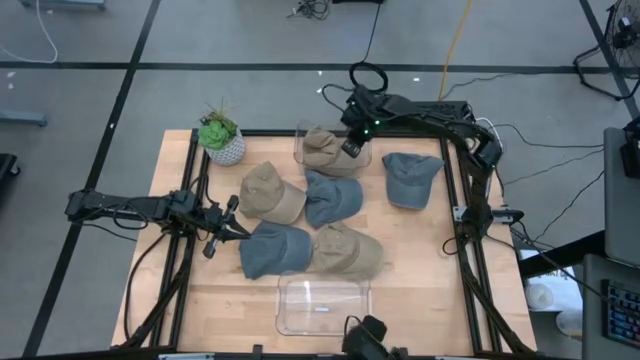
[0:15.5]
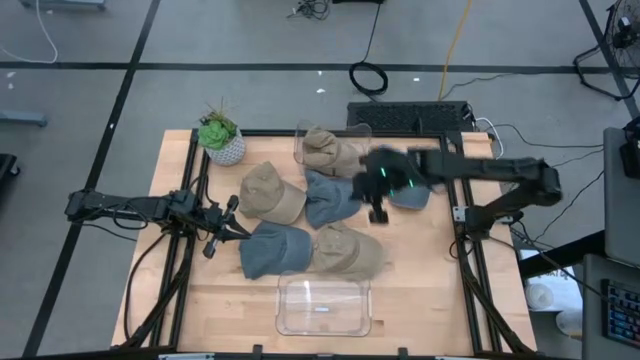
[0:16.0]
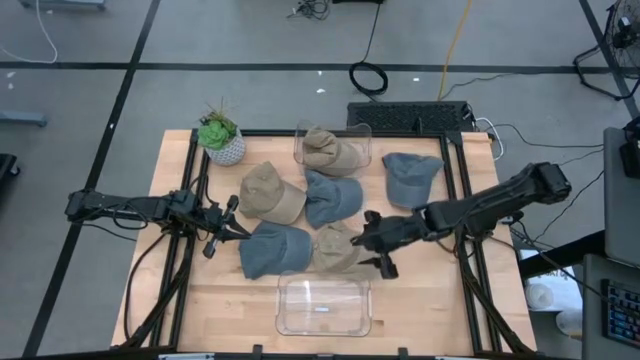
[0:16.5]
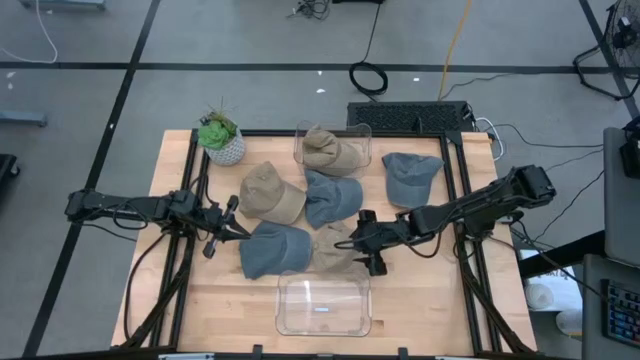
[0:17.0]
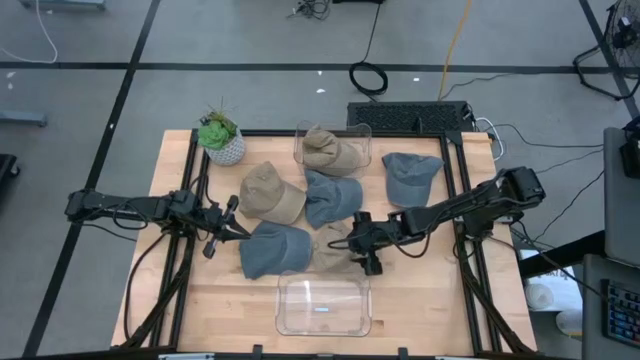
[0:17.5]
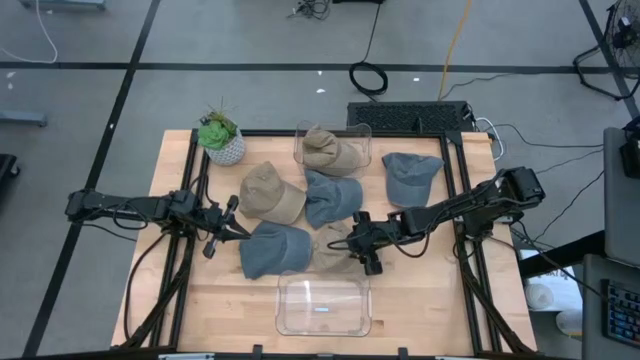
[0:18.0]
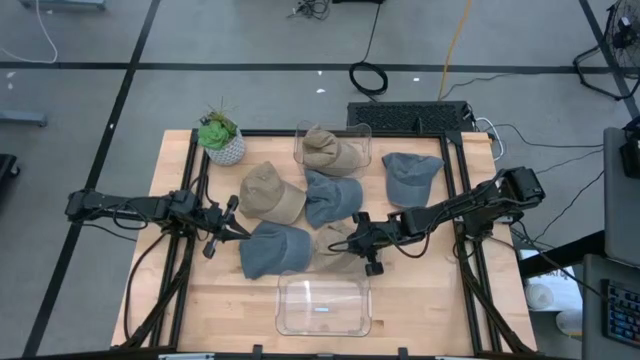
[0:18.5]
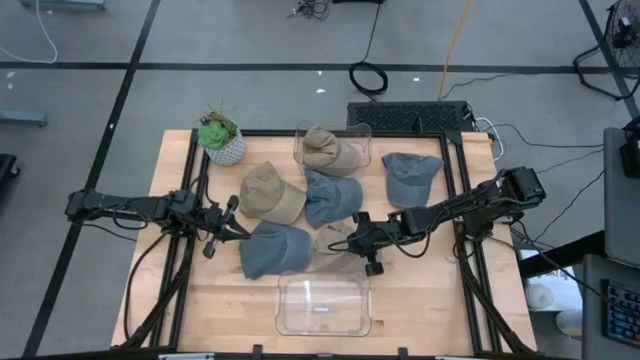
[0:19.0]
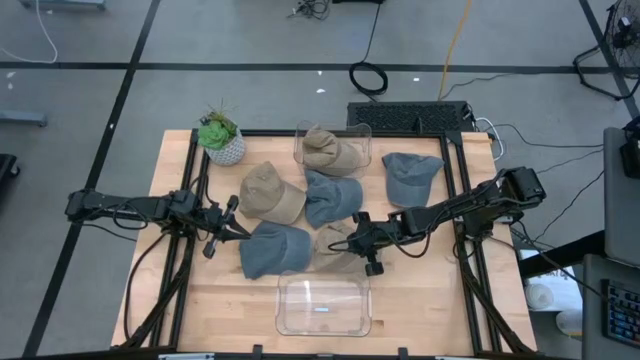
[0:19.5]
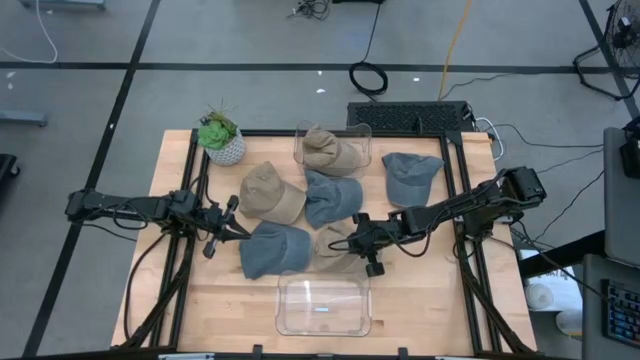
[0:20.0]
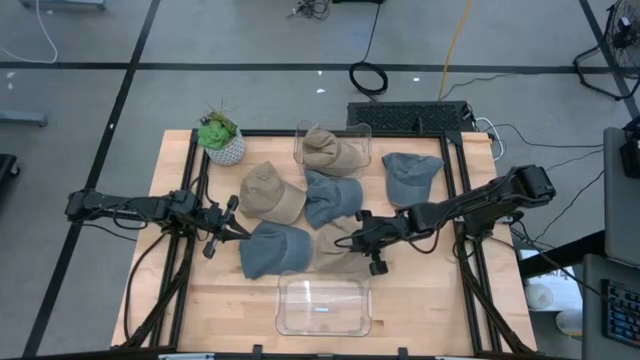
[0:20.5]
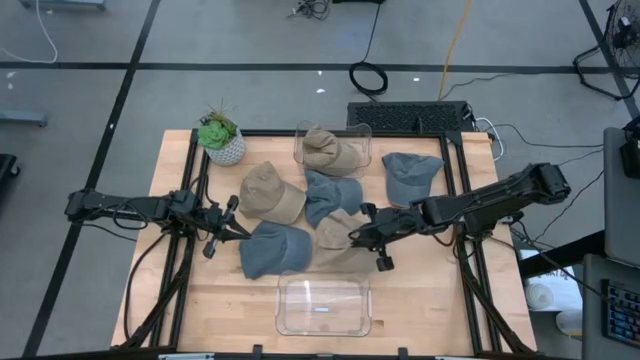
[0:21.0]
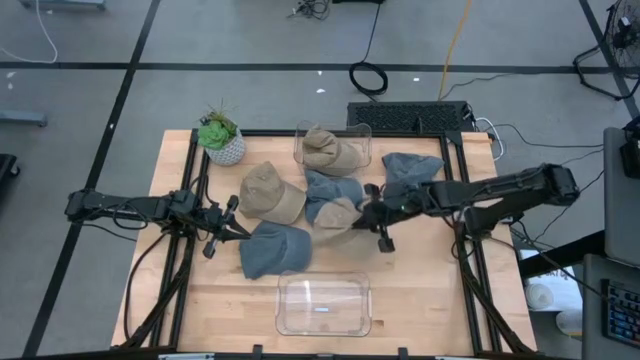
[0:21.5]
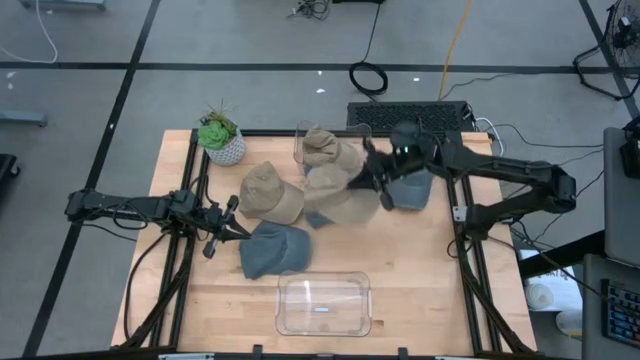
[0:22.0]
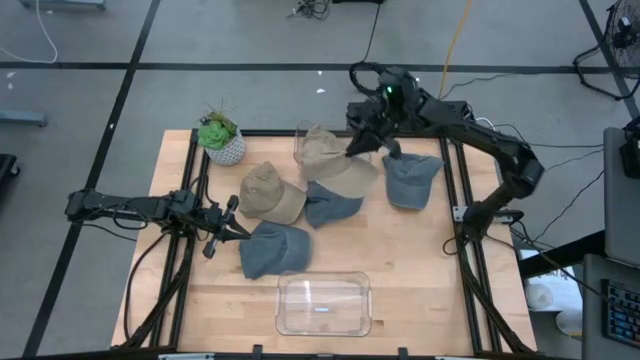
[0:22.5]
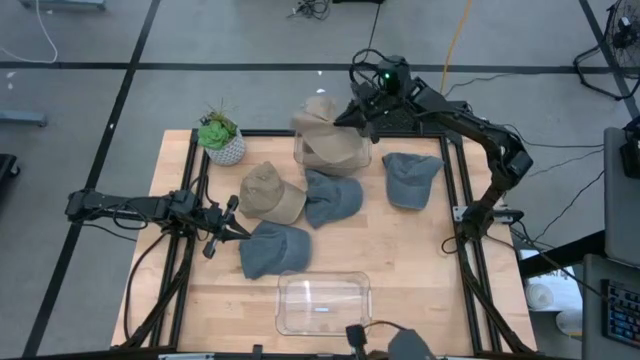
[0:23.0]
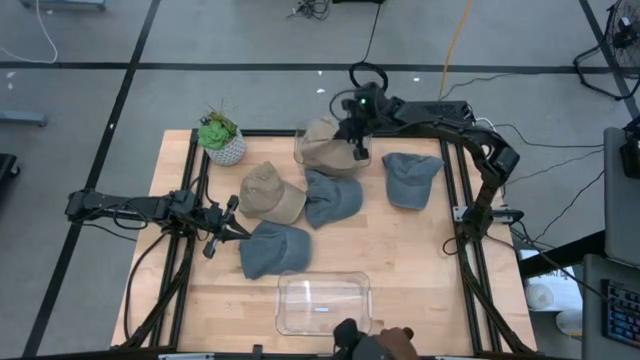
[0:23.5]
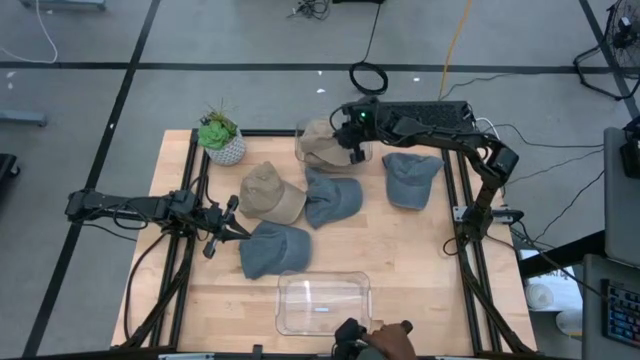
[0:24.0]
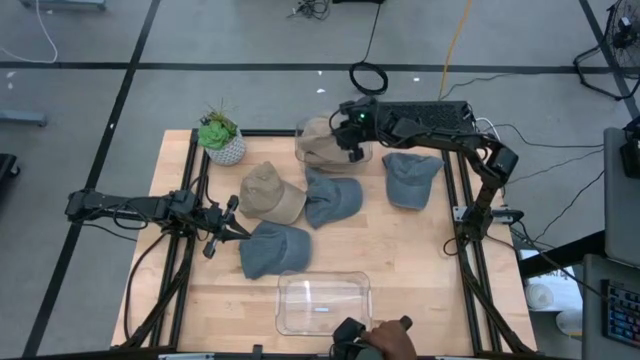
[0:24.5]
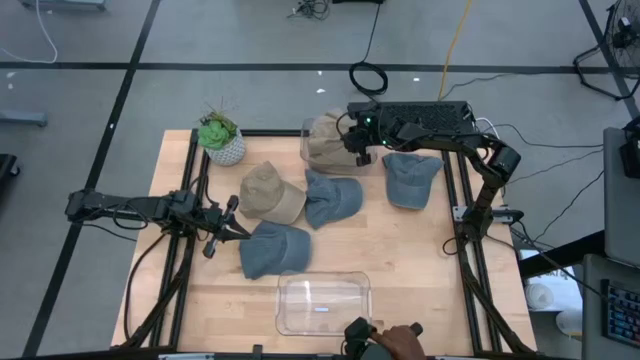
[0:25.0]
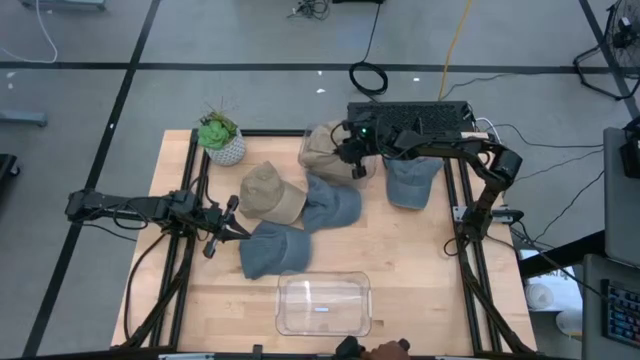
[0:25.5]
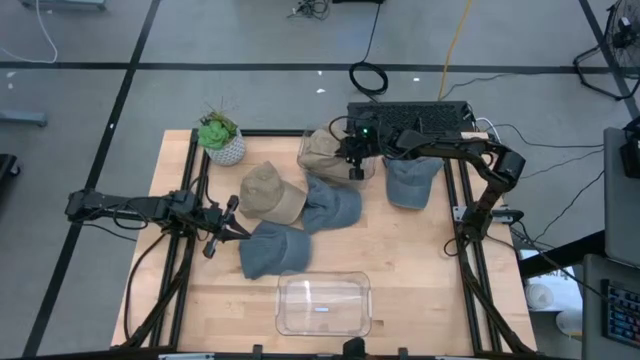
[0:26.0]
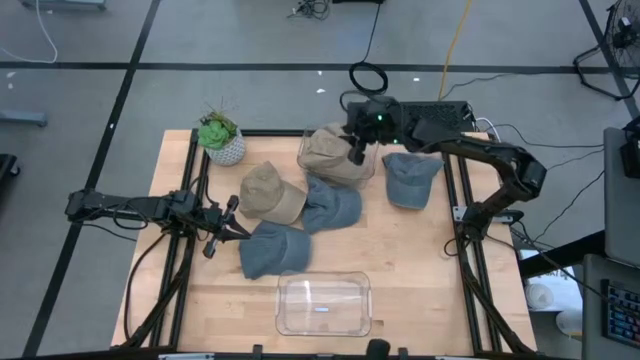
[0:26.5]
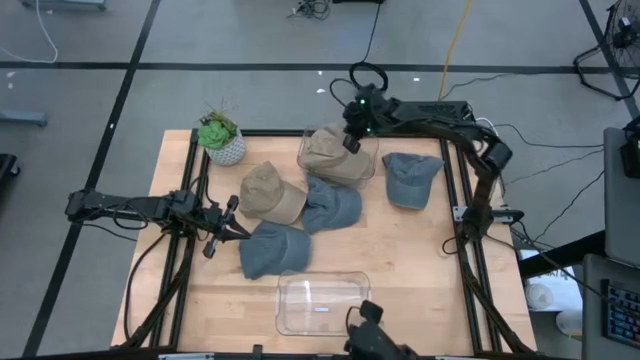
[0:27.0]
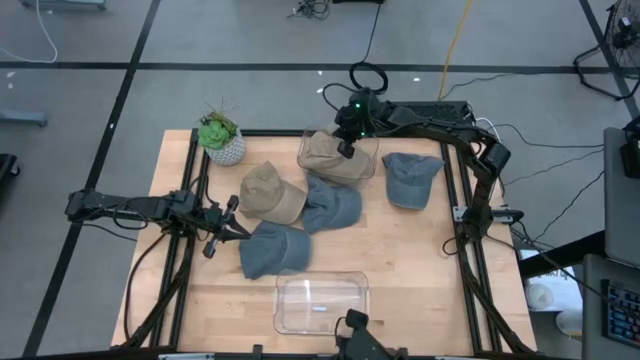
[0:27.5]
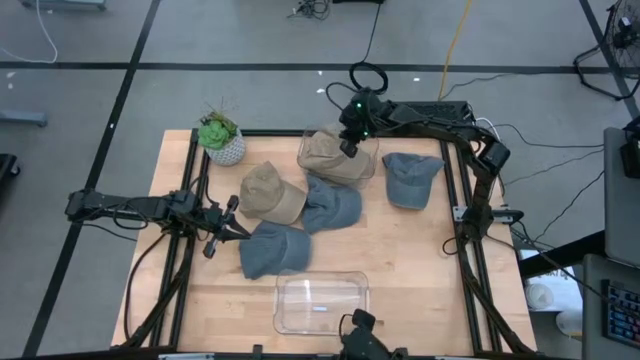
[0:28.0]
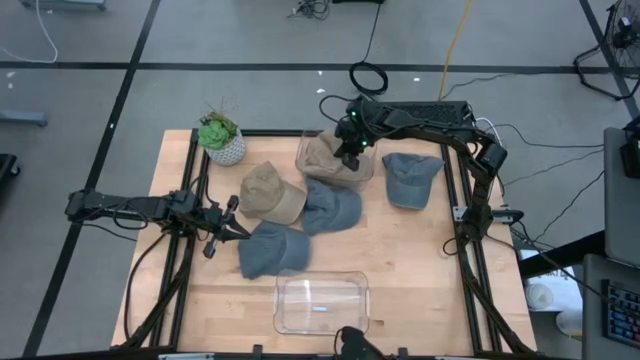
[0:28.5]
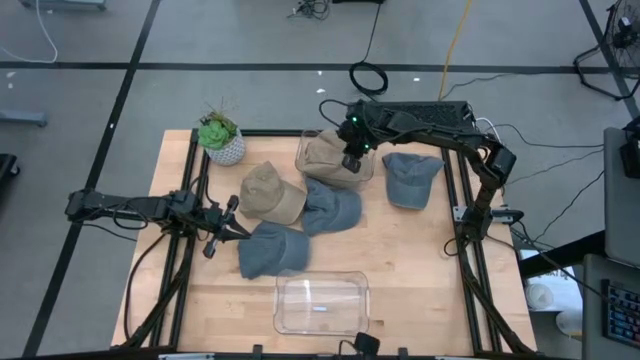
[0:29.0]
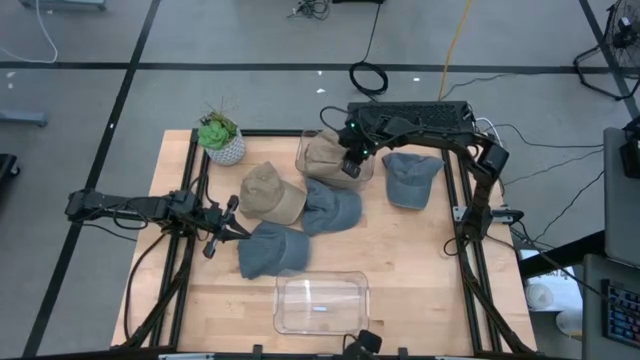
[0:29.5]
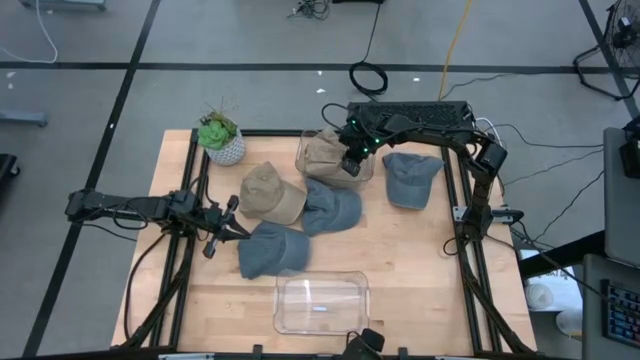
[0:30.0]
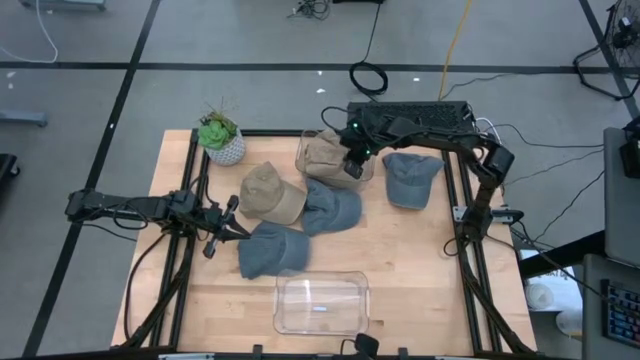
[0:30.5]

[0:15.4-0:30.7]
Task: Pick & Place hat
Put the bottom brown cap into the top transparent bin

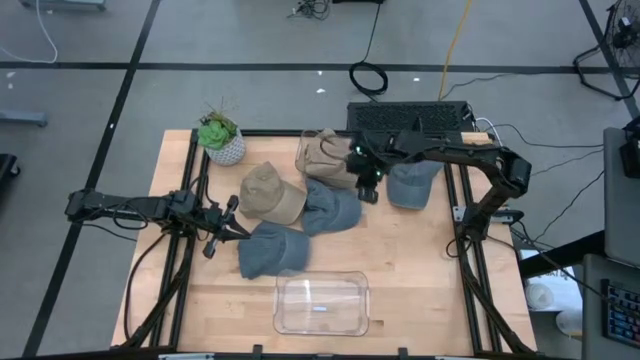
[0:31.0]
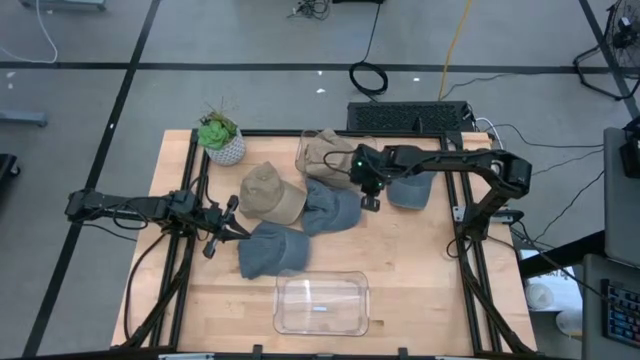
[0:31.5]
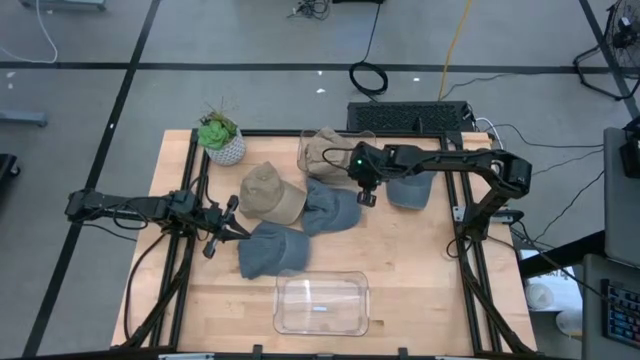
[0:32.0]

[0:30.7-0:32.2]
Adjust the top transparent bin

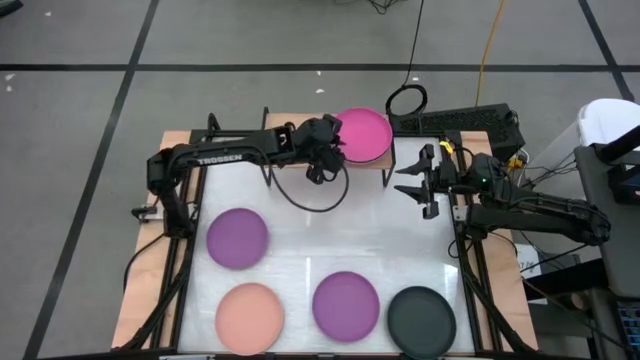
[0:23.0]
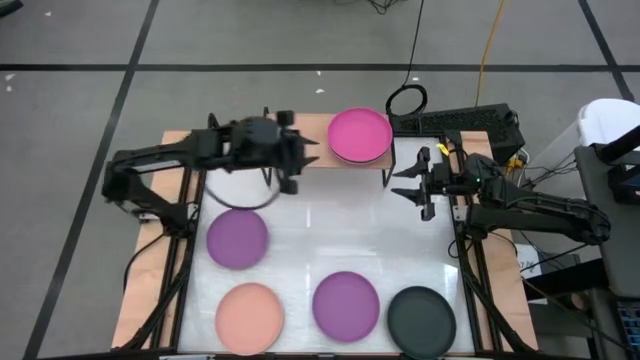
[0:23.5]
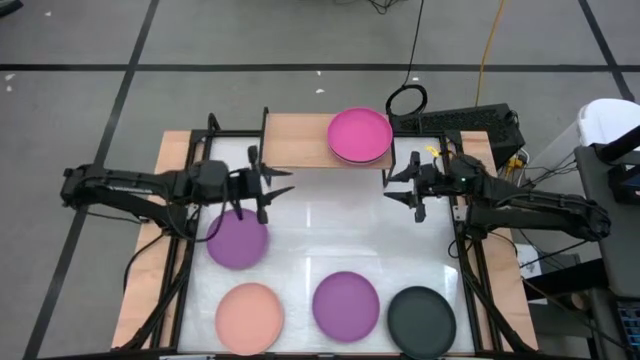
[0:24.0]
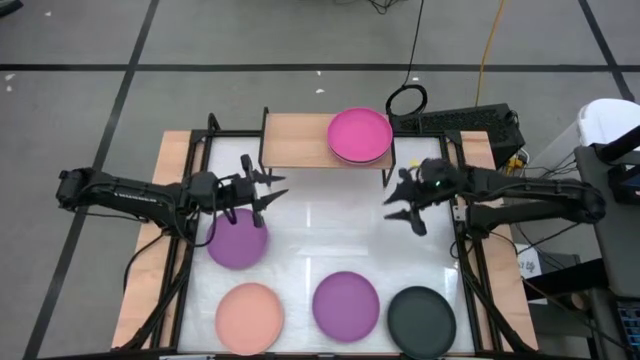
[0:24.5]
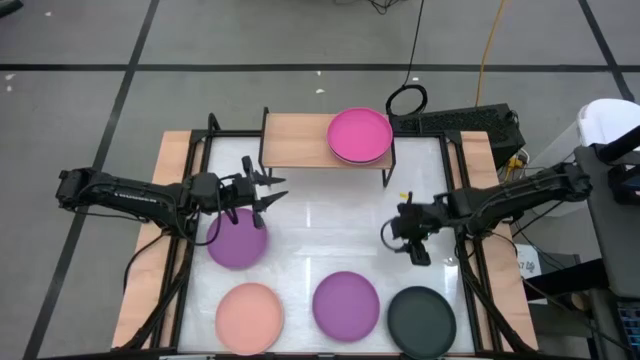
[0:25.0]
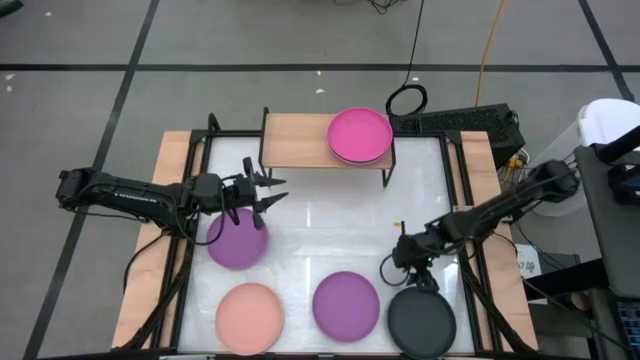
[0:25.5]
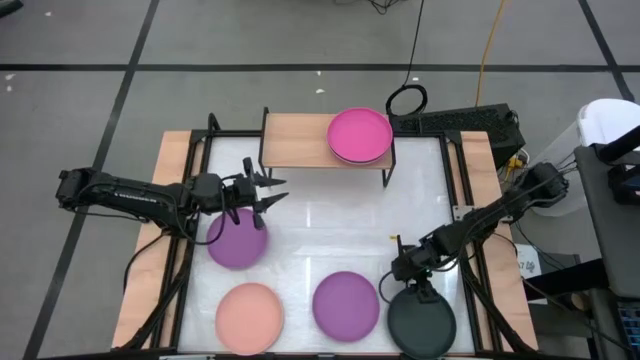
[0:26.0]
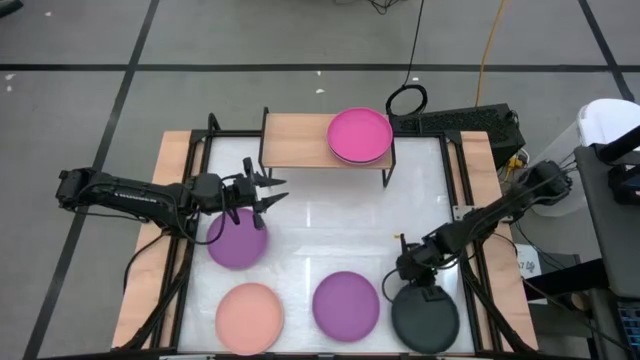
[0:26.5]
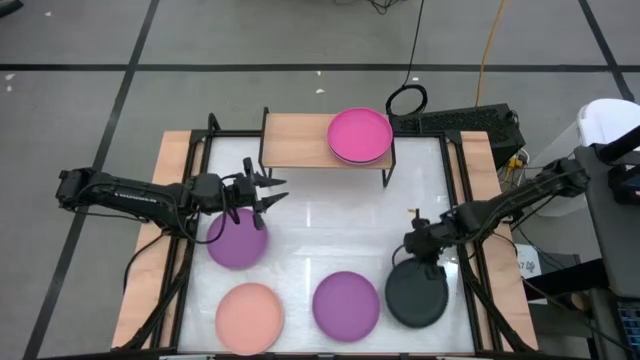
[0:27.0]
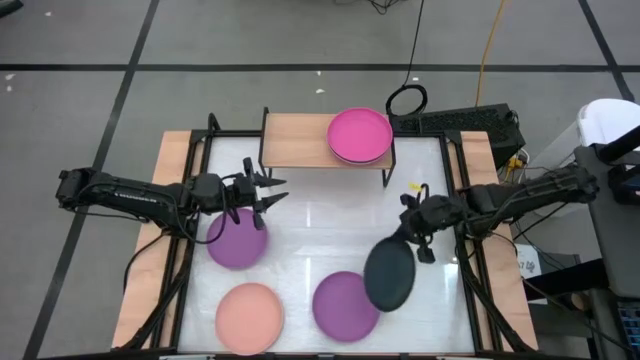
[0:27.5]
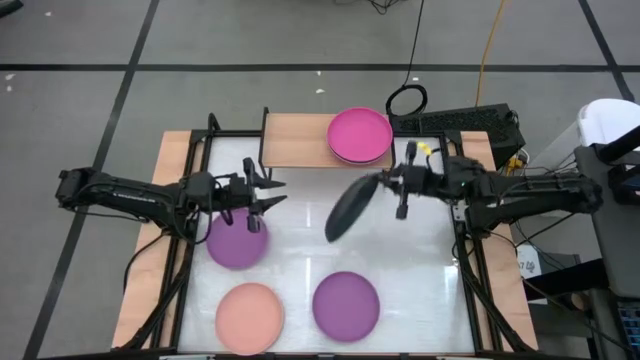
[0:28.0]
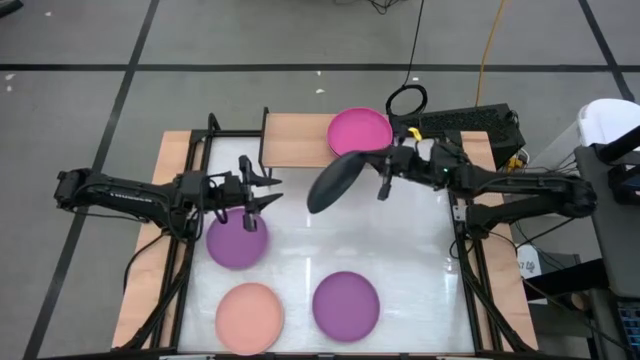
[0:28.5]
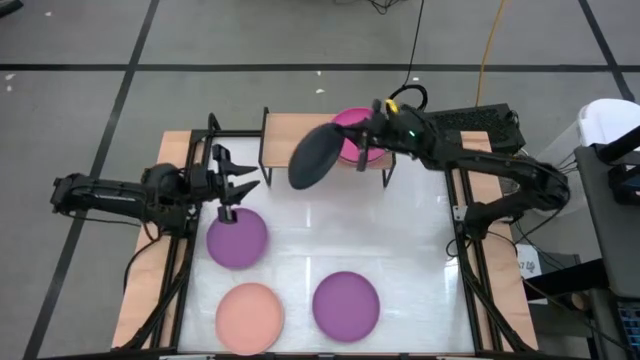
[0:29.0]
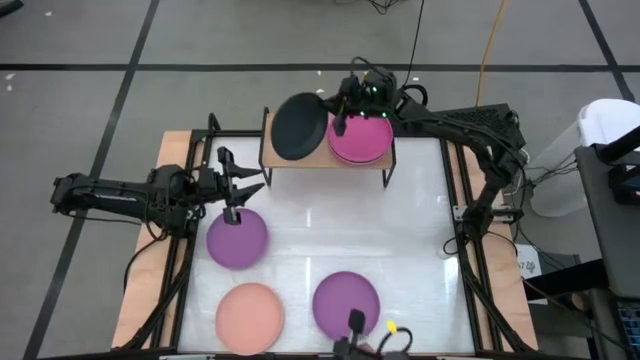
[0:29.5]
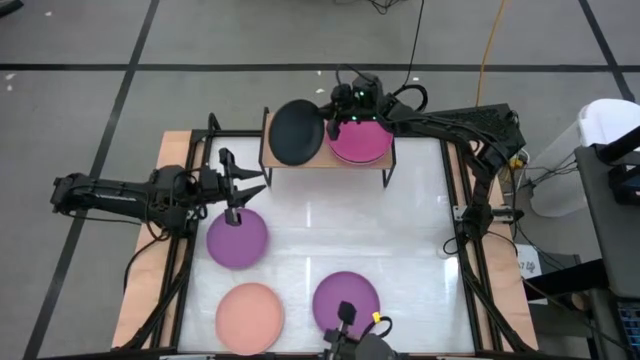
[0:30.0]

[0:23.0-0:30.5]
Task: Place and stack plates onto a shelf
Put the black plate on the shelf
